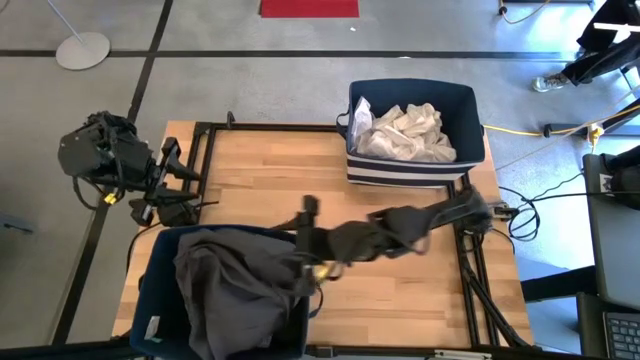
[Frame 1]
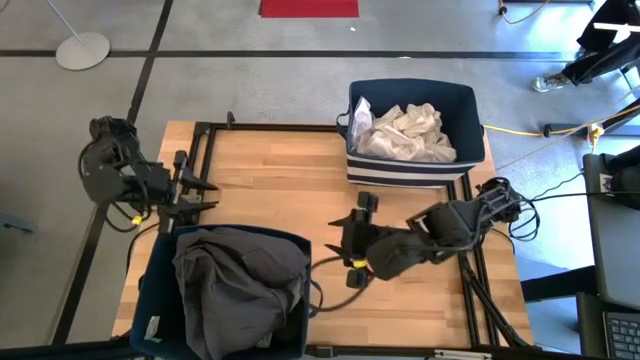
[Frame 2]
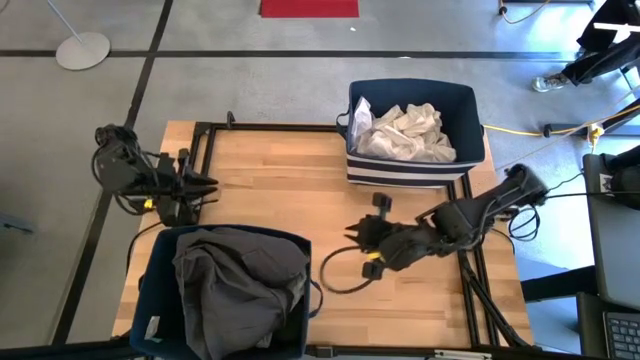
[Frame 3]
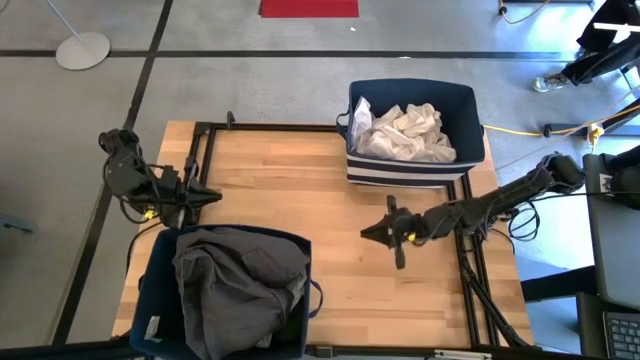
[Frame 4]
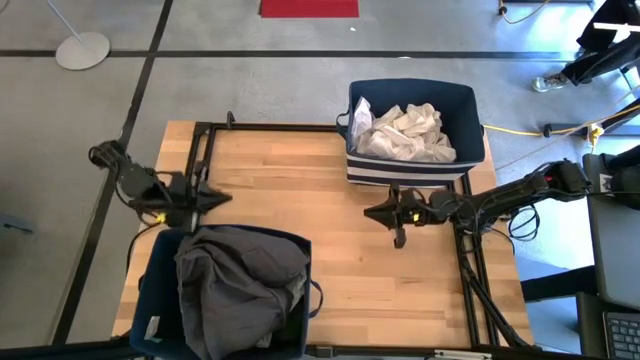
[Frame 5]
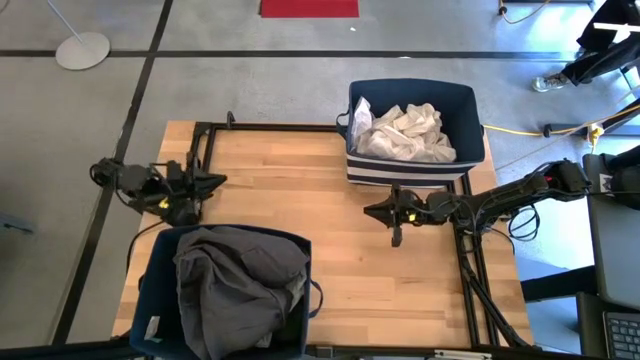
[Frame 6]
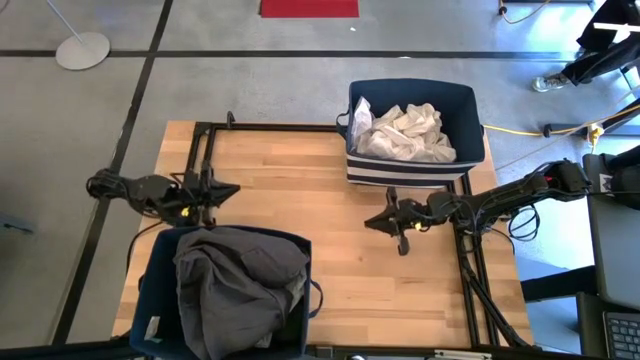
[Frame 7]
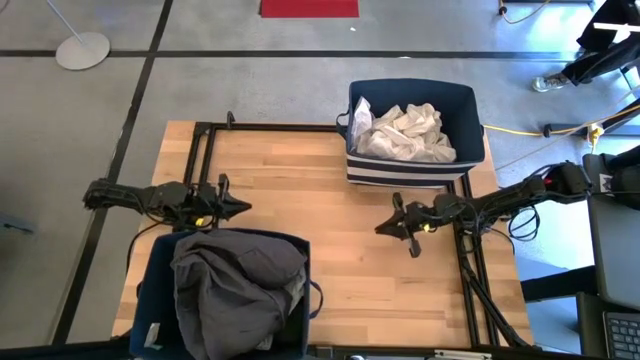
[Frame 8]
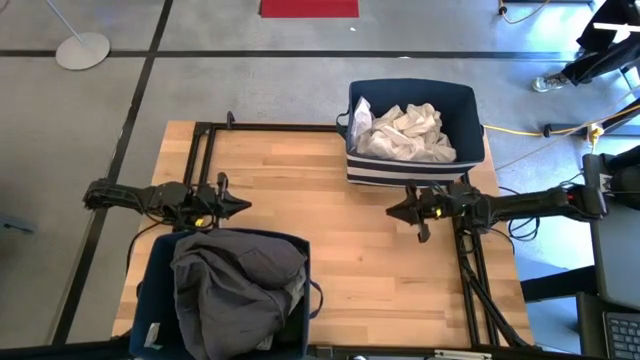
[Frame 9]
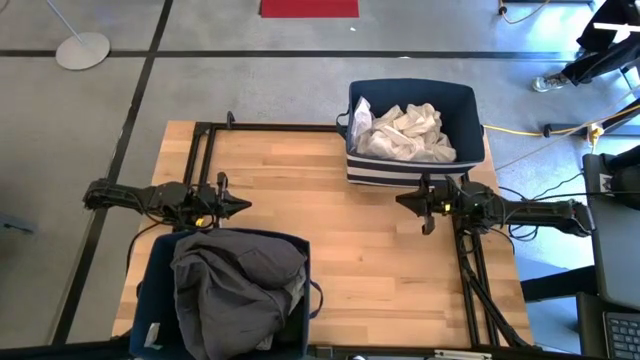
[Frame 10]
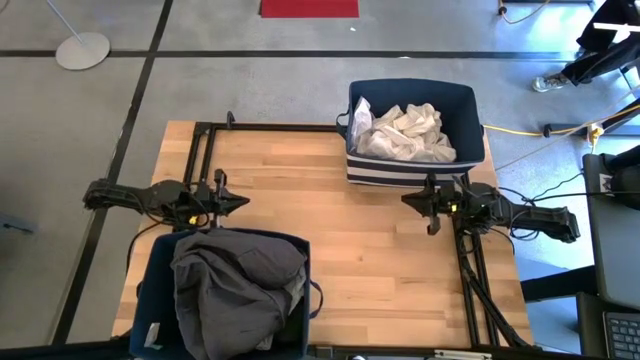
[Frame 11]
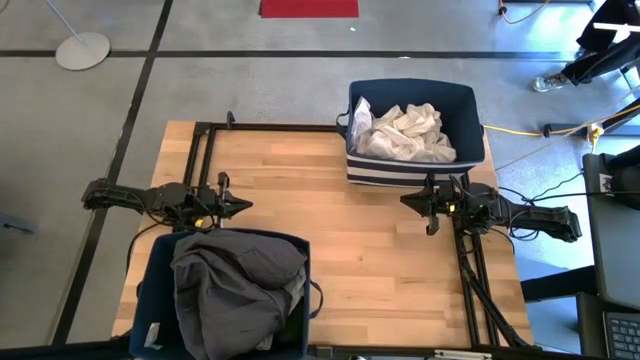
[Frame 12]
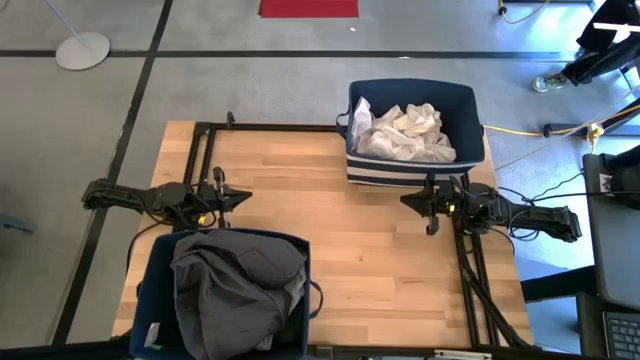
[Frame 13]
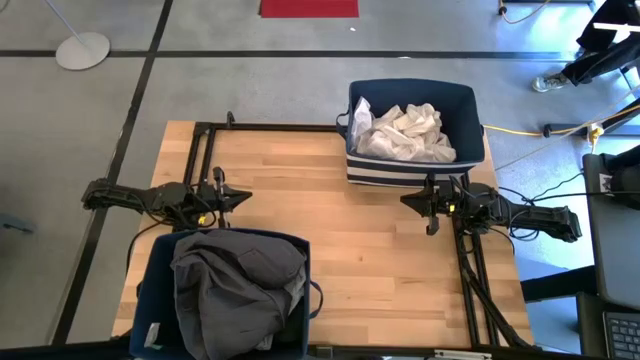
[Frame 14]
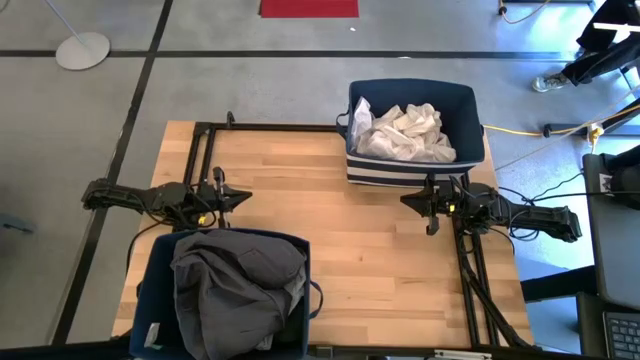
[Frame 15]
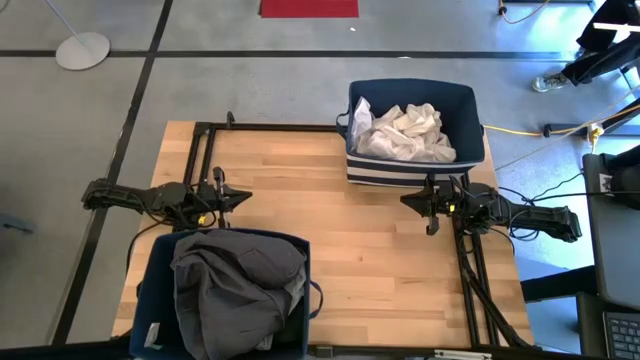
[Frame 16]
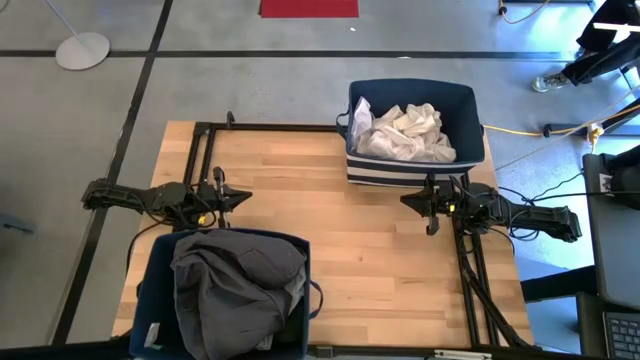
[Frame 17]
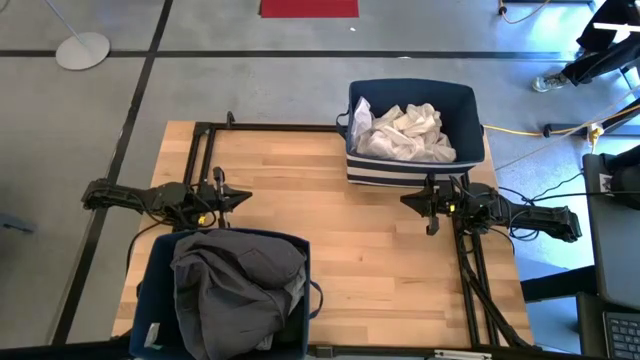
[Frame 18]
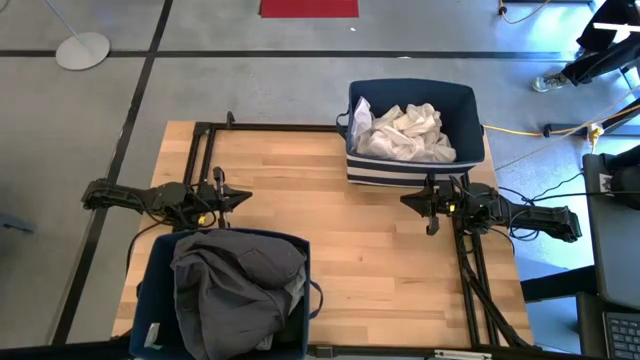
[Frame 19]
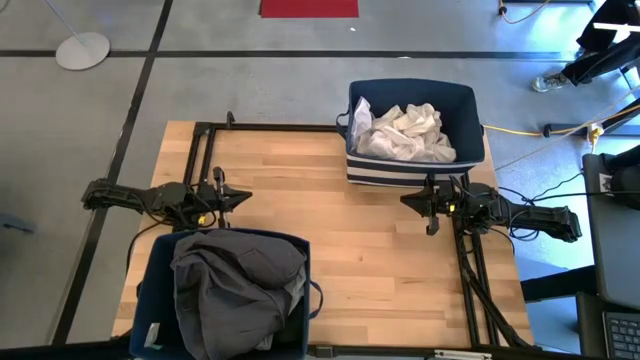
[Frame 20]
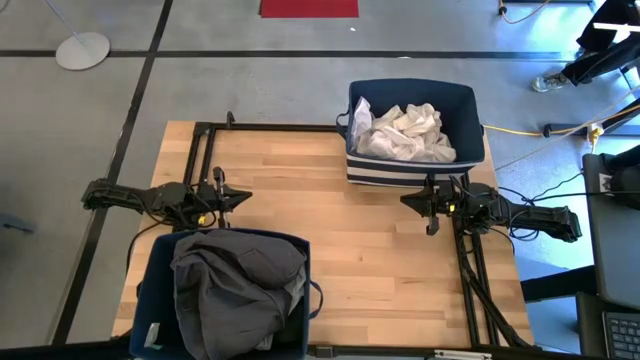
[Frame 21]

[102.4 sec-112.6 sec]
Task: Sort clothes
Return to Home Position

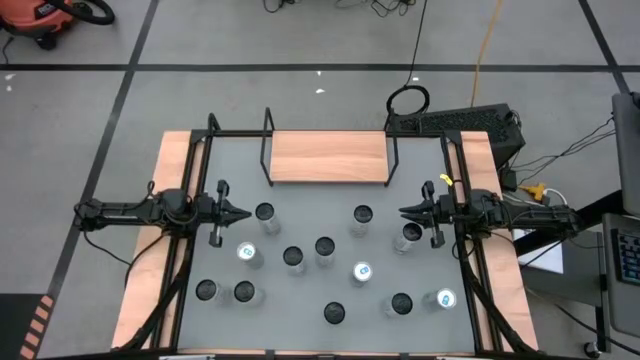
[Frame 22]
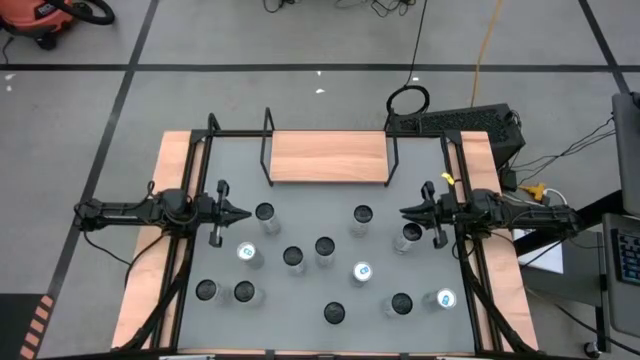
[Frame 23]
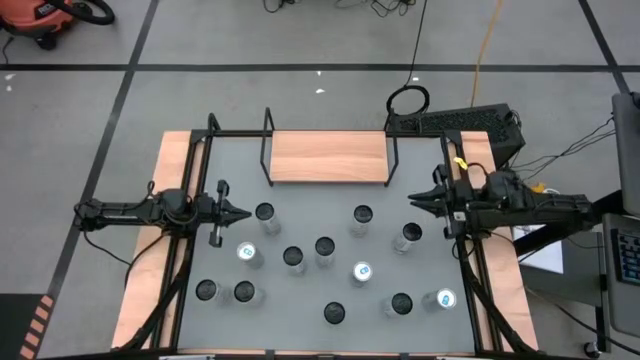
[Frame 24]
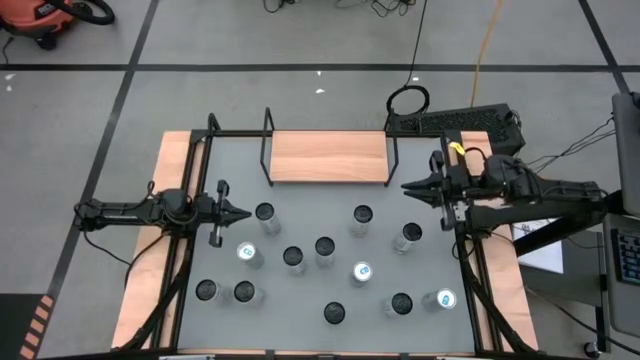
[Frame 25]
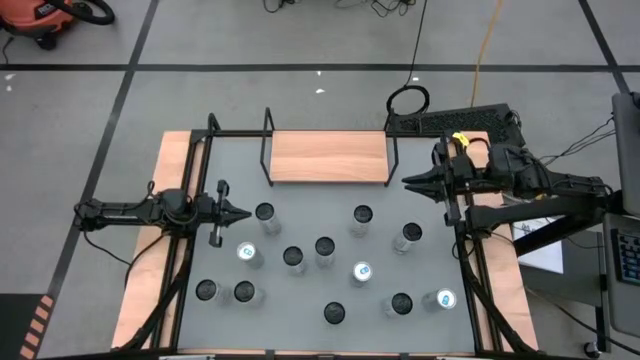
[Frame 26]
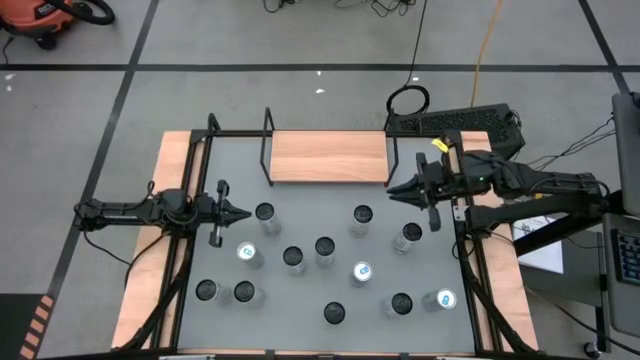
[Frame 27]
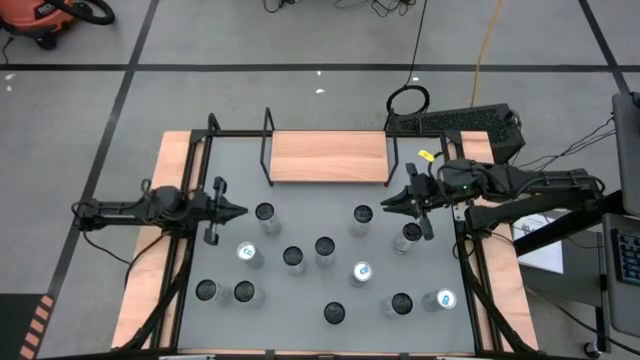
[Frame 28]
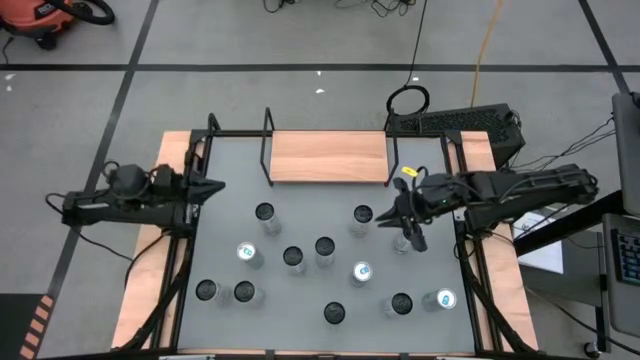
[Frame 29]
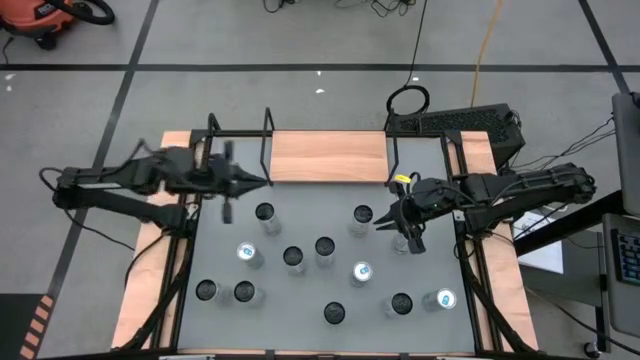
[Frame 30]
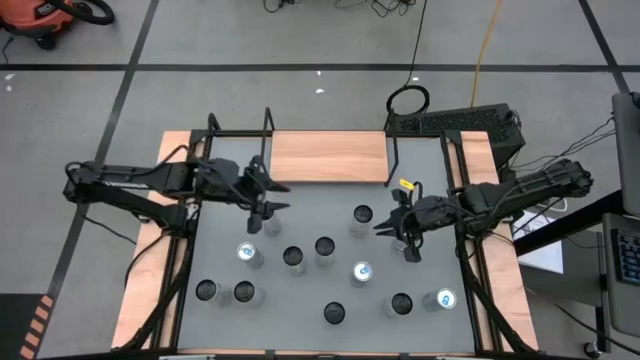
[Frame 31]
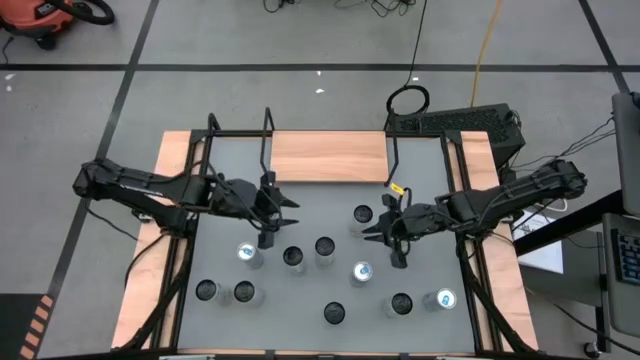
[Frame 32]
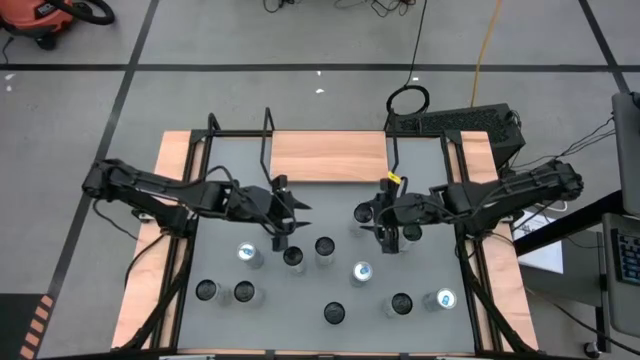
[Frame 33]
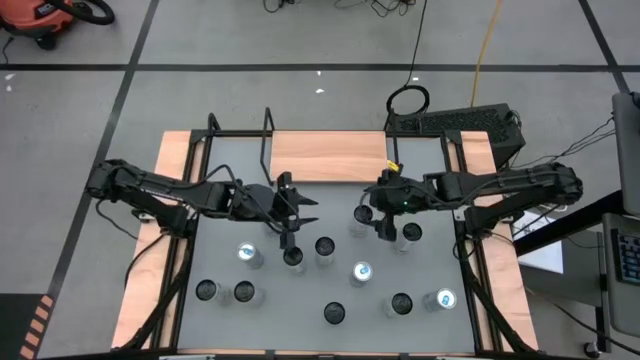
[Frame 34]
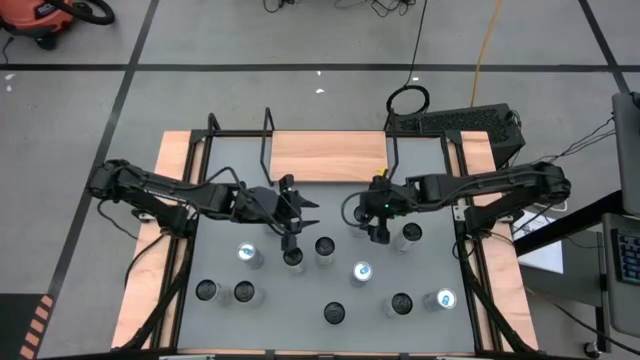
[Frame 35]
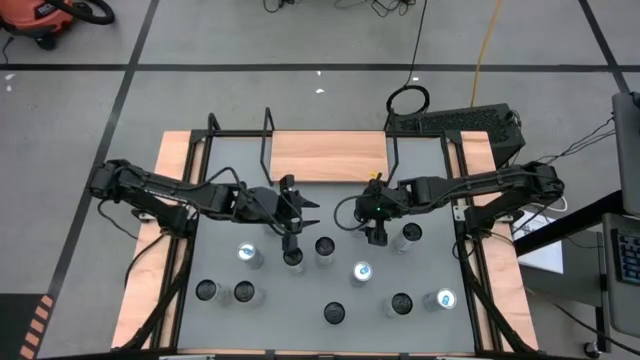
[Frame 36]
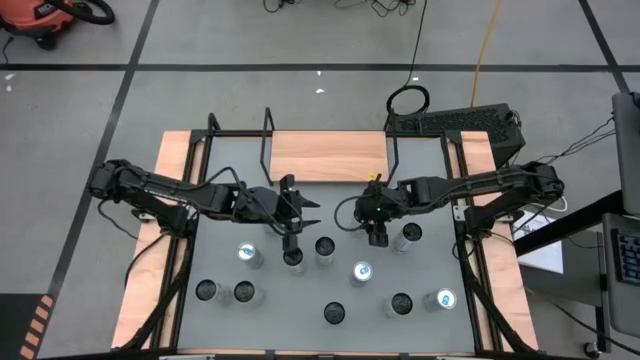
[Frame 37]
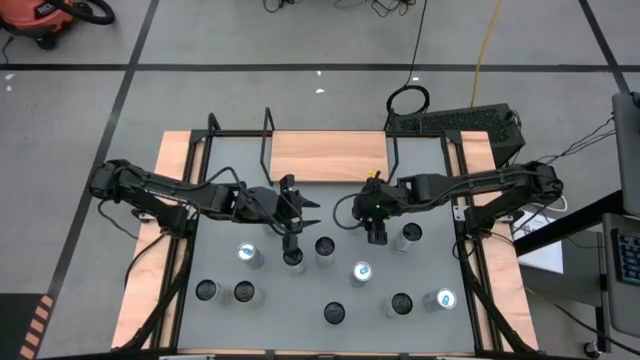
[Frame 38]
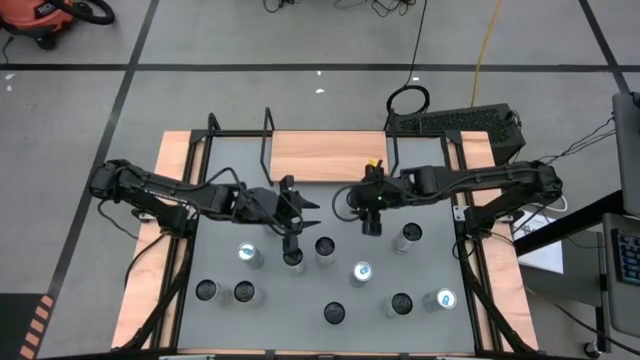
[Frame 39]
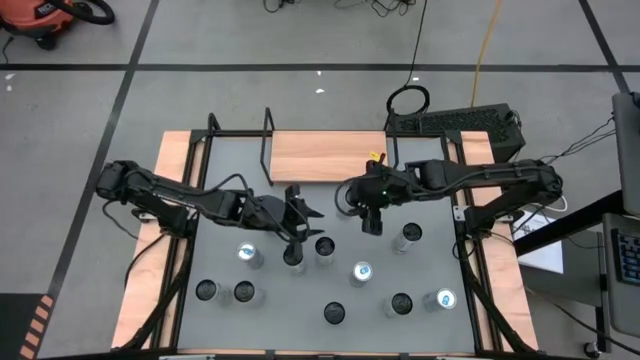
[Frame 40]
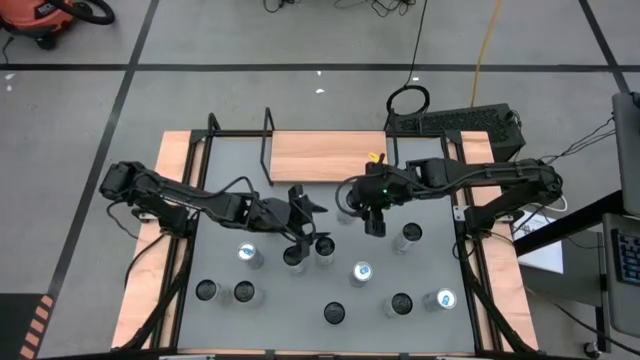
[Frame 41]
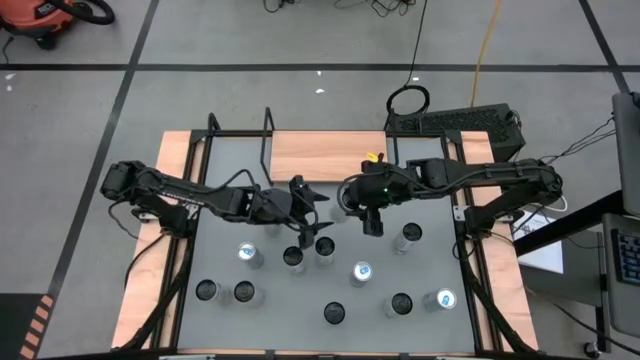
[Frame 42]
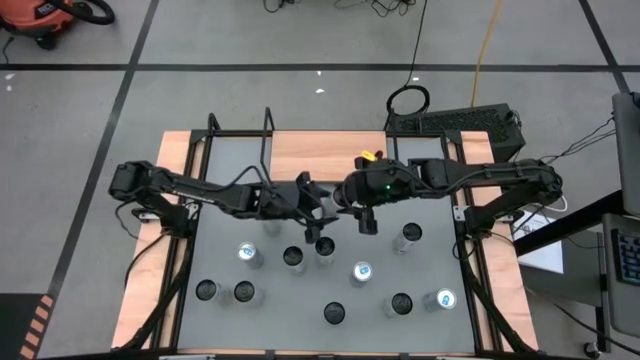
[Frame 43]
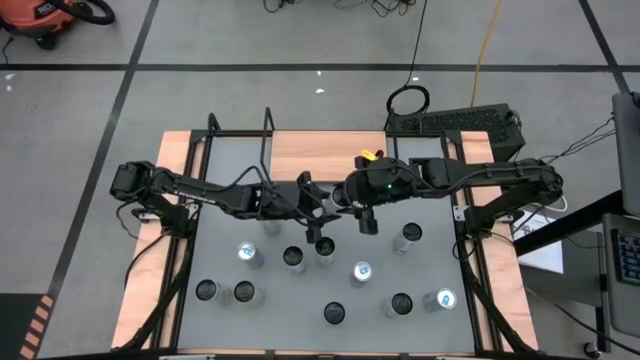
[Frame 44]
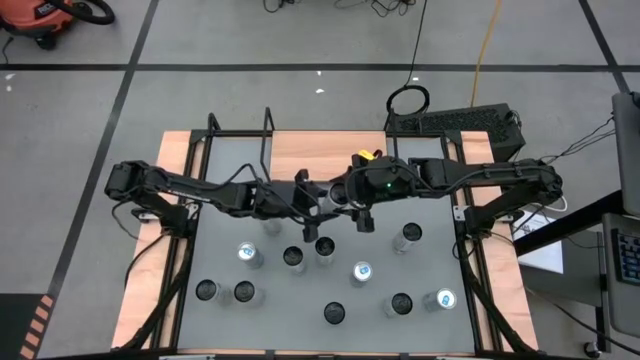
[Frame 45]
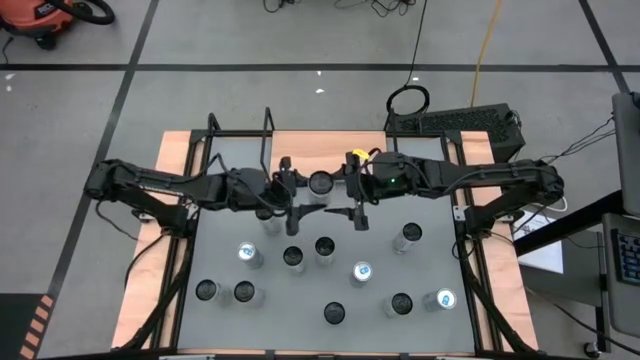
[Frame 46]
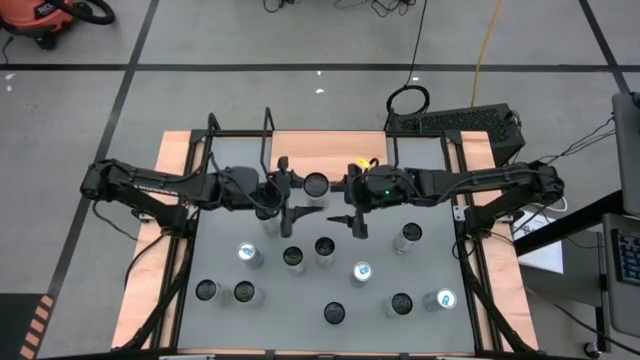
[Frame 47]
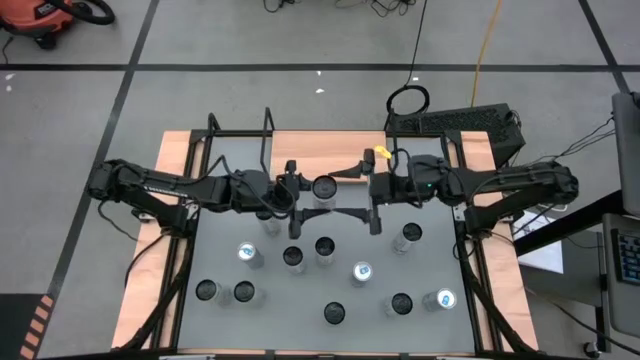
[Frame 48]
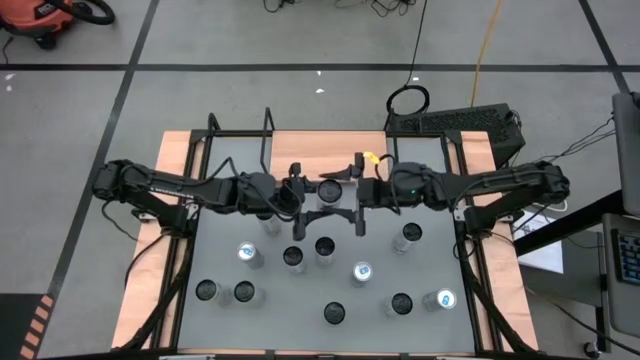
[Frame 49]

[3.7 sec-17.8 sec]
Task: Place canned beverage on shelf
Put the top right white yellow soda can on the shelf
